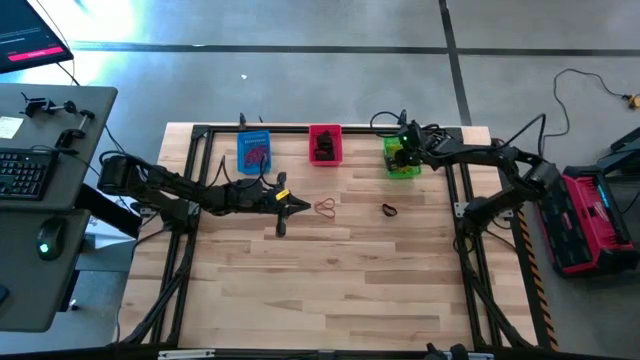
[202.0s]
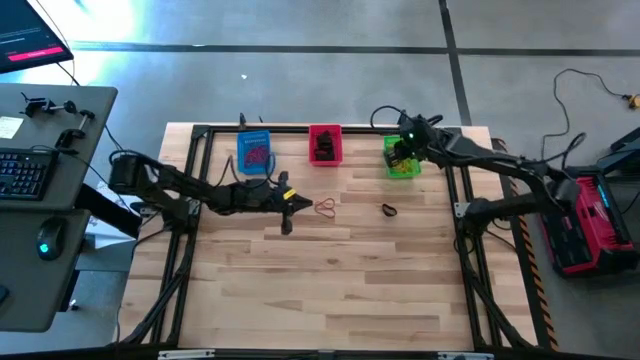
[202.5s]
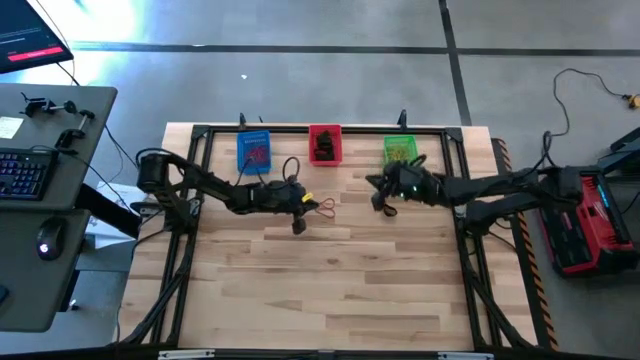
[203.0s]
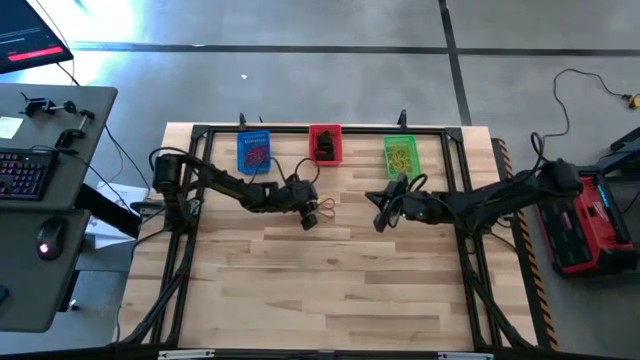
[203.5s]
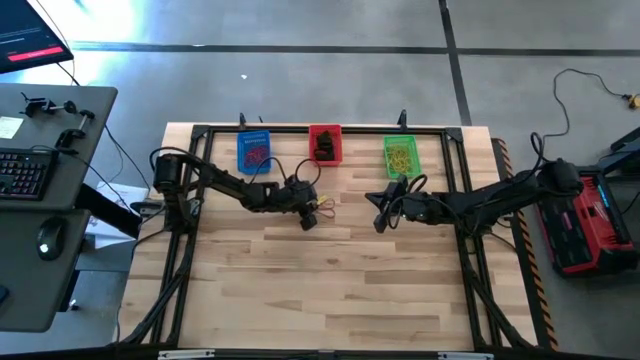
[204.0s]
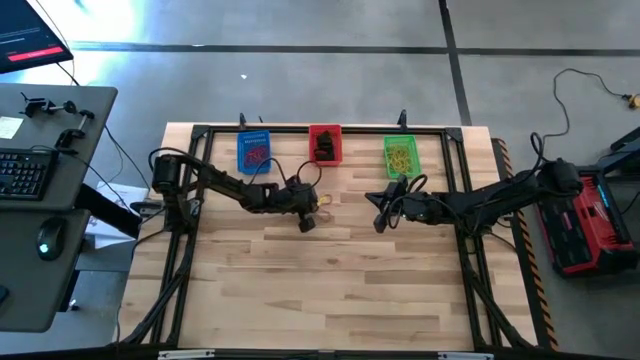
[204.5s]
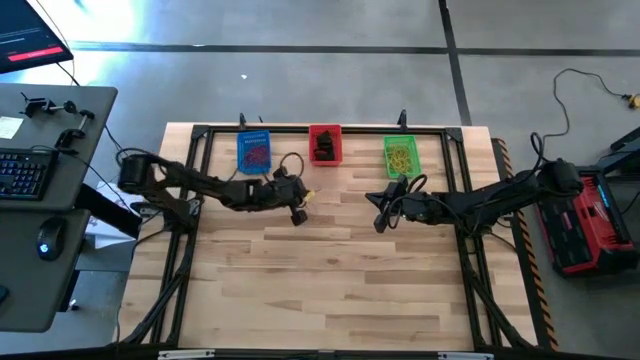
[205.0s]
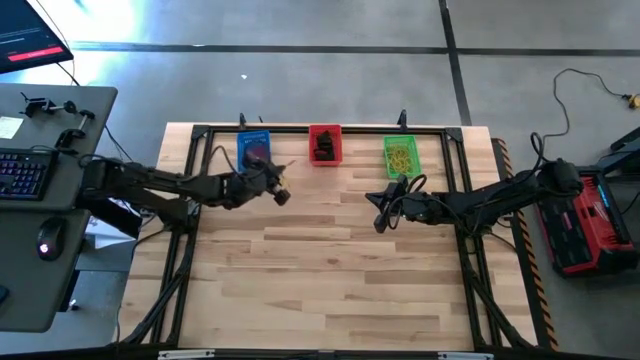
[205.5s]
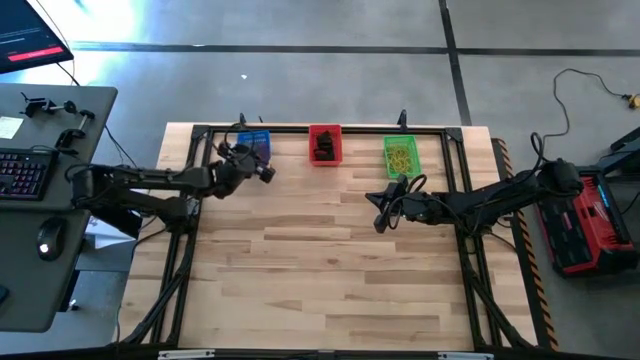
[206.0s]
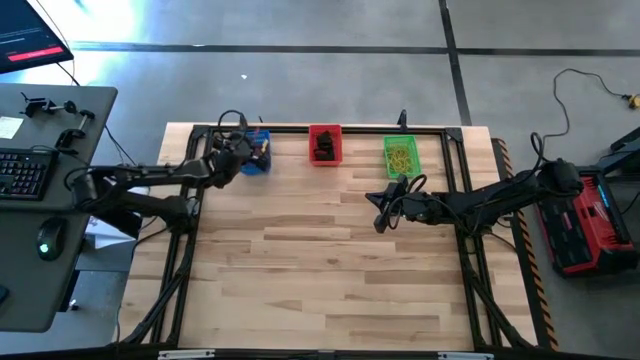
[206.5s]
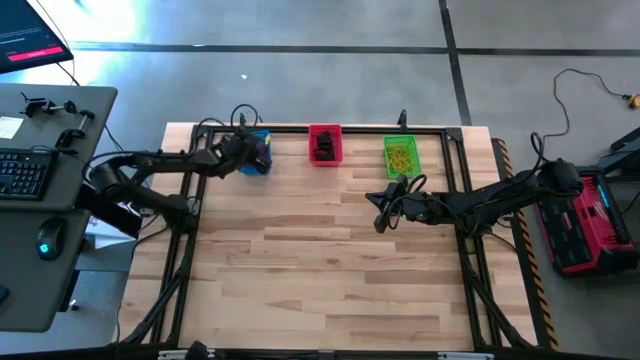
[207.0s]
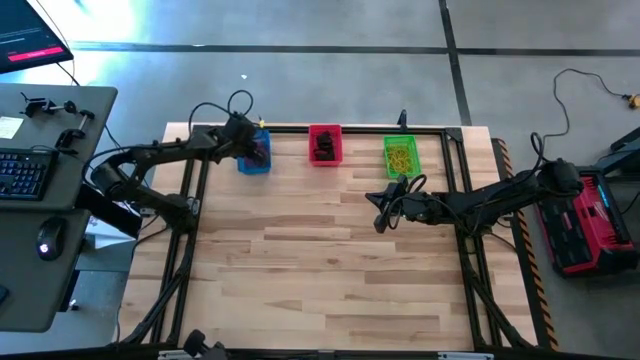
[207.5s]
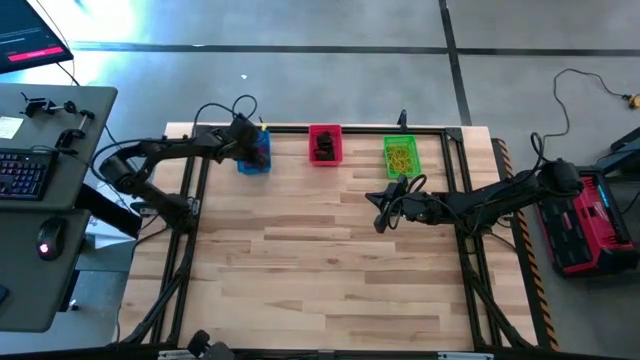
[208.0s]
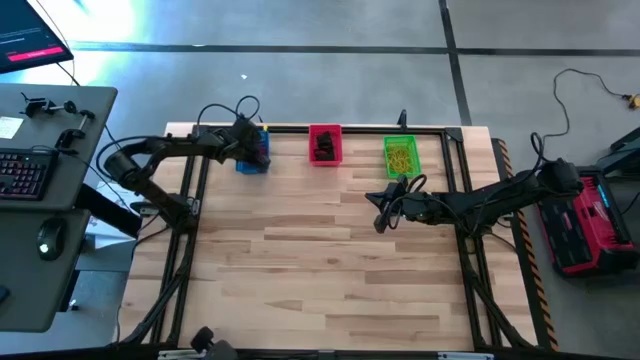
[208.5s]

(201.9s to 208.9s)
Task: Sort rubber bands into baskets
Put the red rubber band into the blue bin

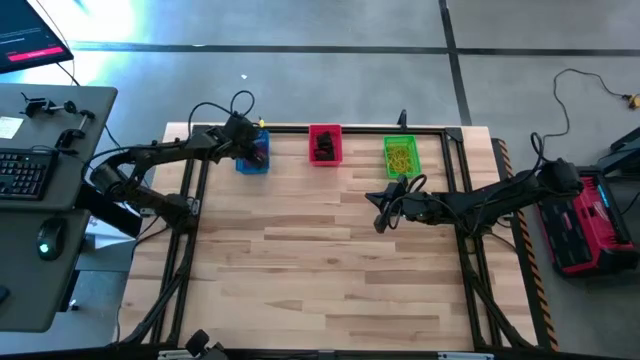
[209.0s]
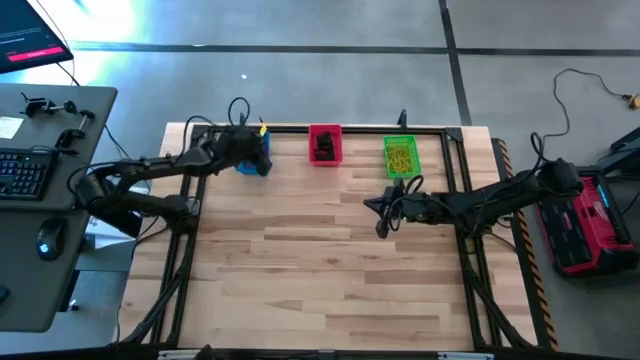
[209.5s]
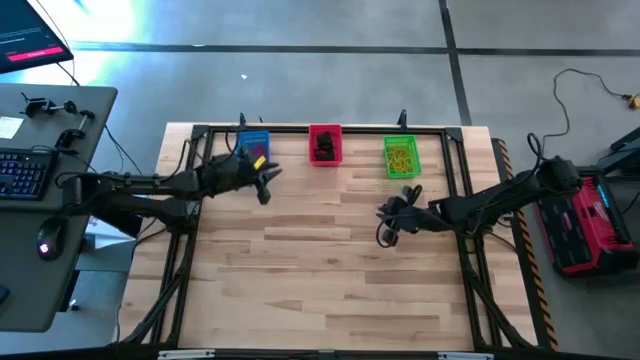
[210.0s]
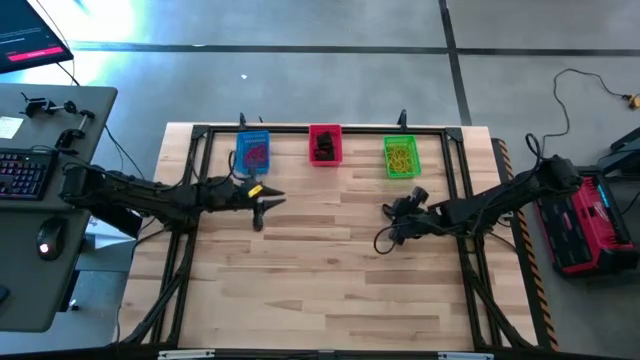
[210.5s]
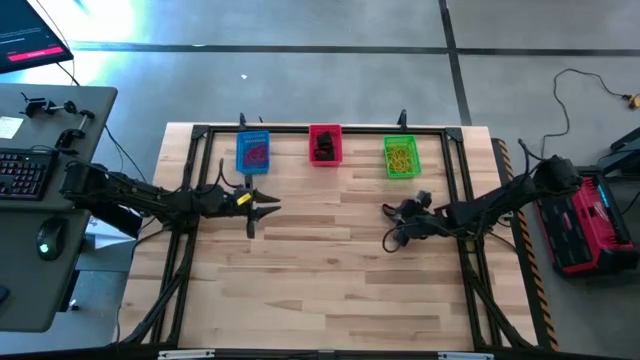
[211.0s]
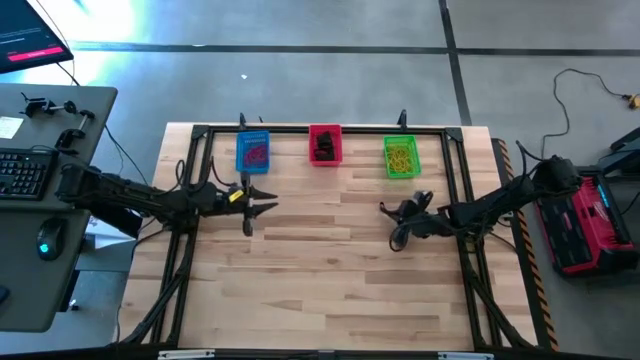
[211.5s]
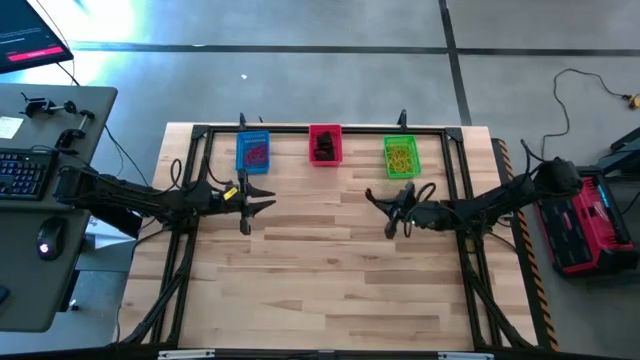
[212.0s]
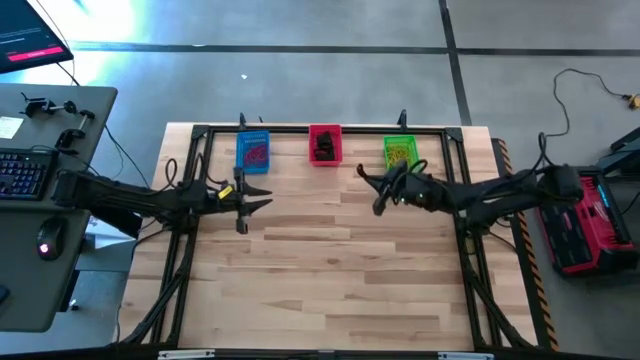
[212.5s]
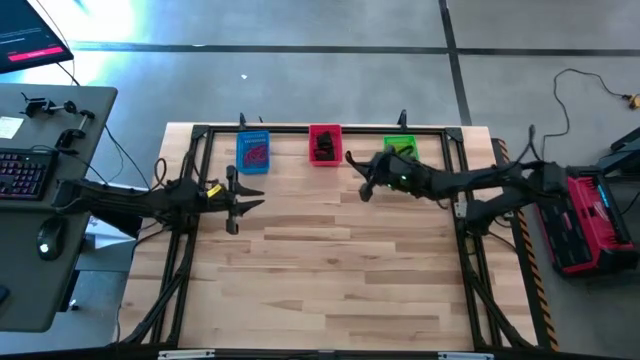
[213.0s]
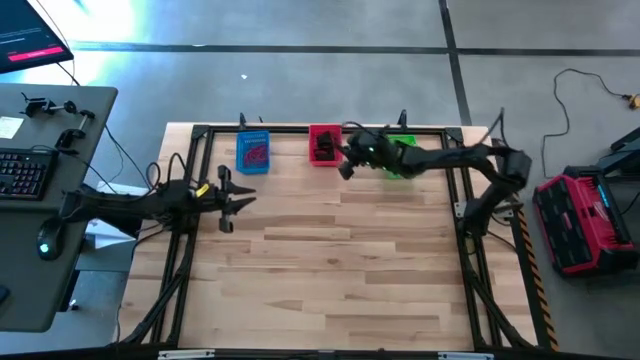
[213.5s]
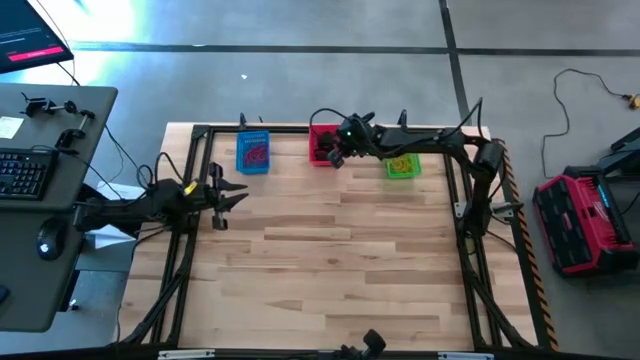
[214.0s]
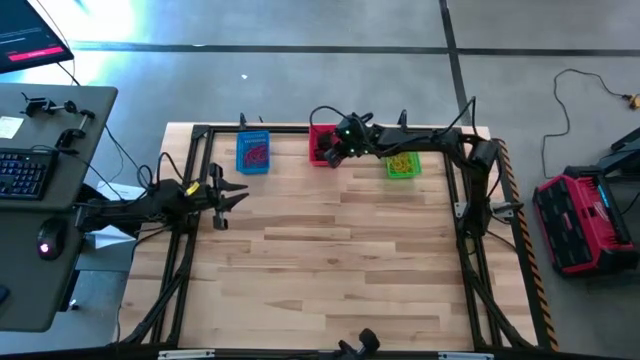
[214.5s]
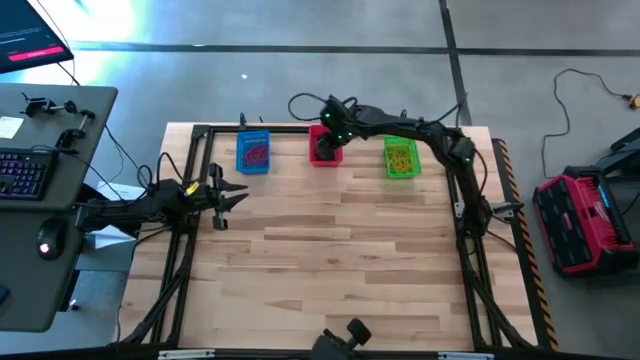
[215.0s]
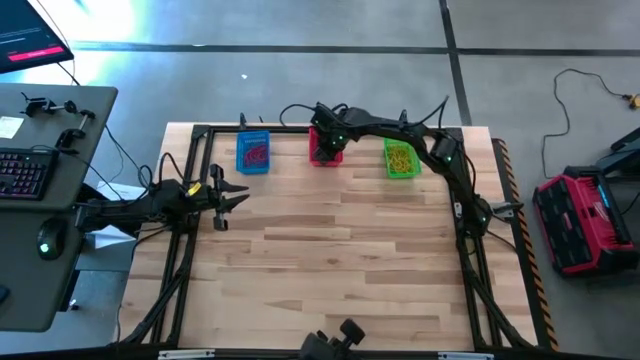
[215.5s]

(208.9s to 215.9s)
Put the black rubber band into the red bin

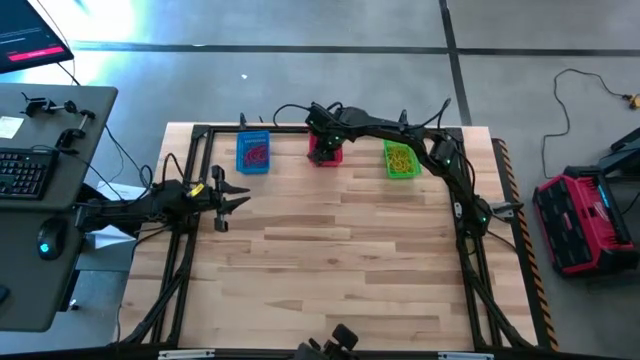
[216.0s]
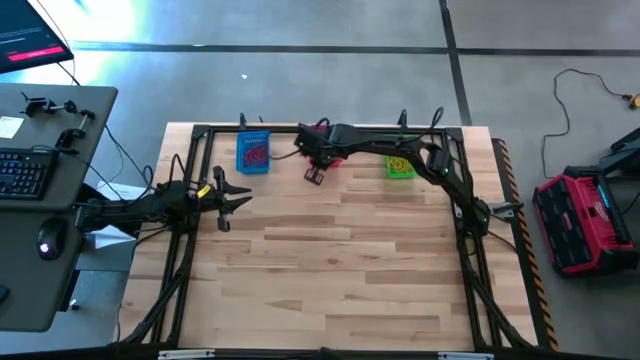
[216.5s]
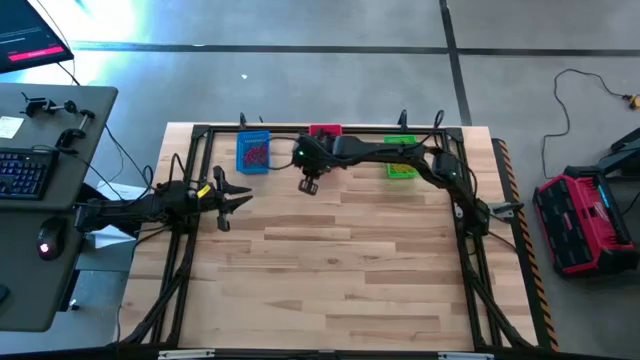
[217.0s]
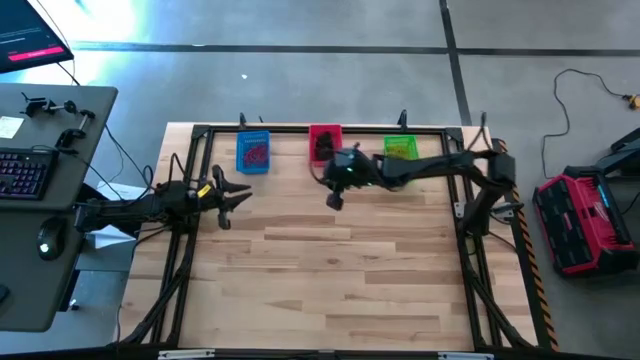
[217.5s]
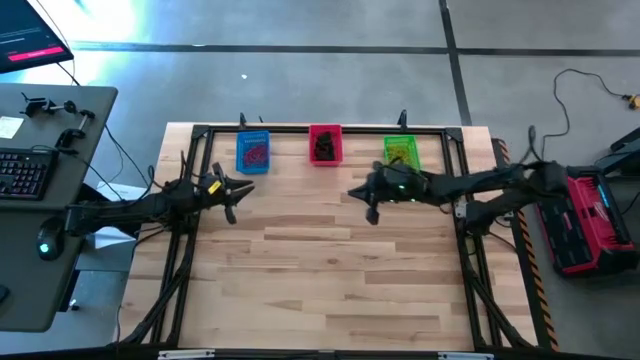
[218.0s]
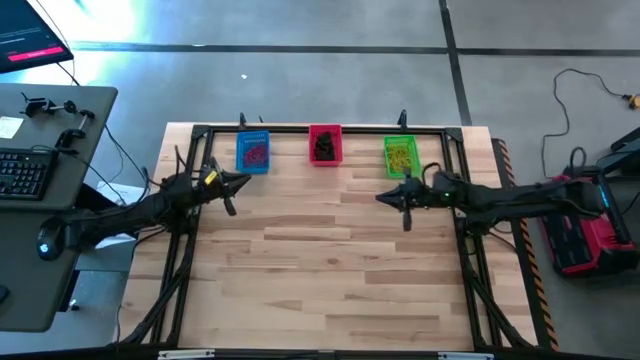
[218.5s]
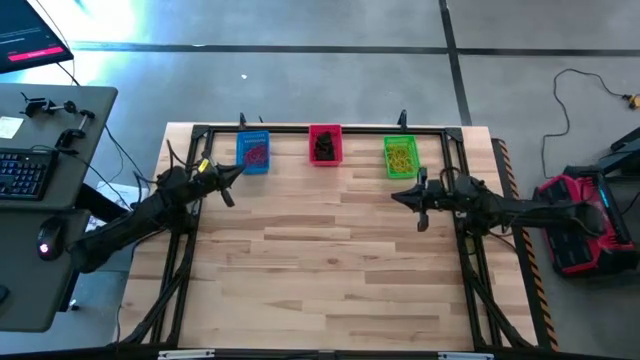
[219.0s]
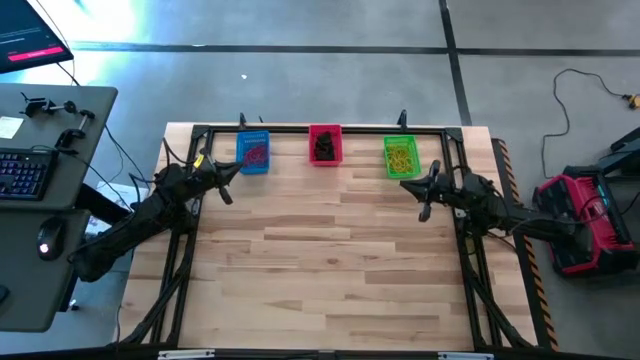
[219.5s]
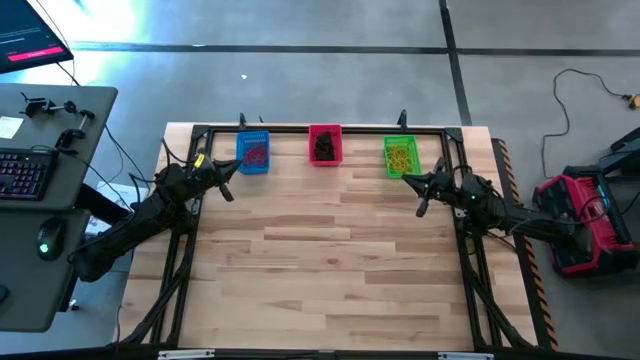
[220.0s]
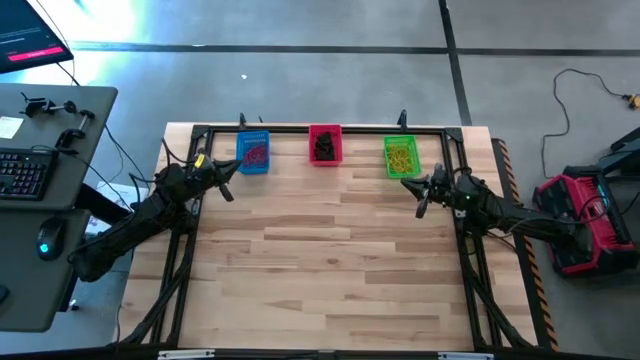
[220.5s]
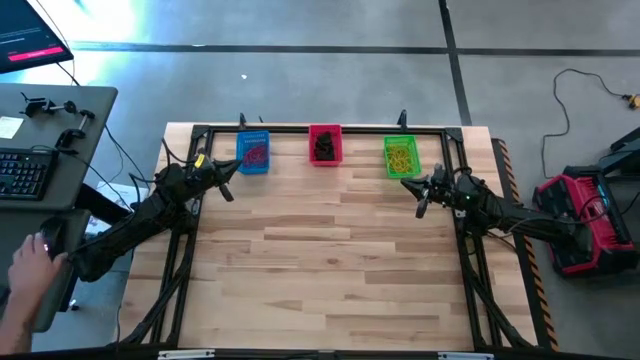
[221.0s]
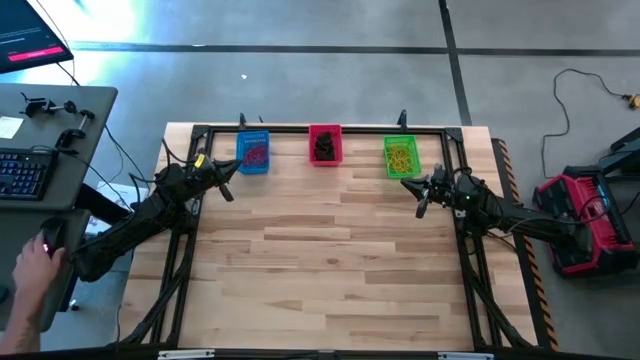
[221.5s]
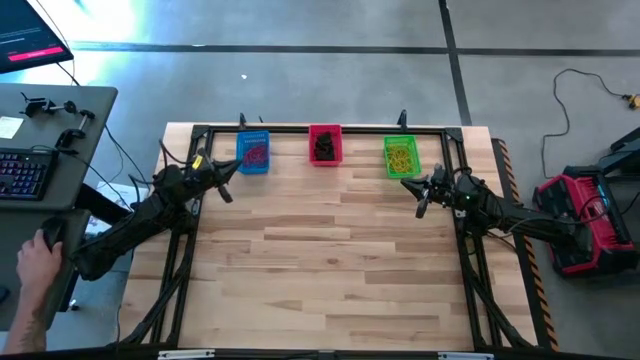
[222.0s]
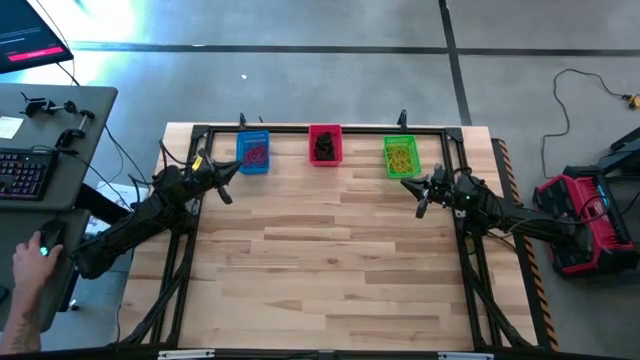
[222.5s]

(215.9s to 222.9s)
Return to Home Position
